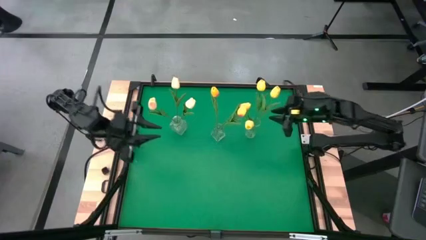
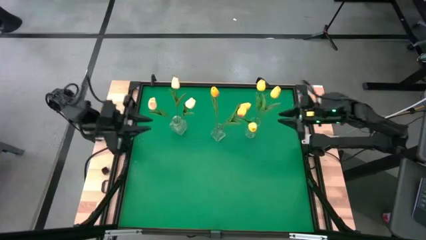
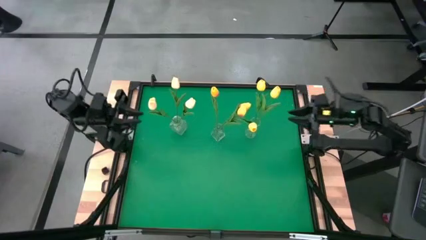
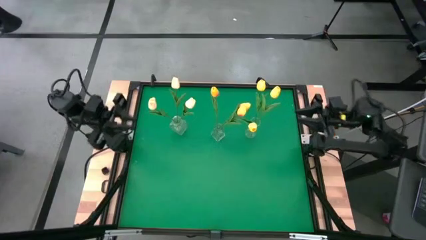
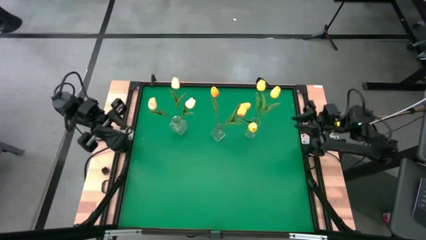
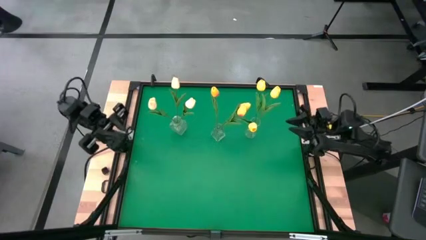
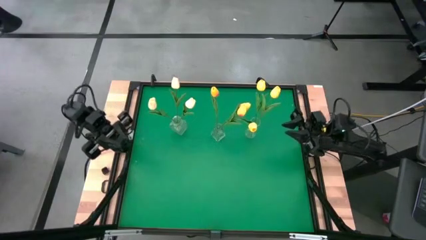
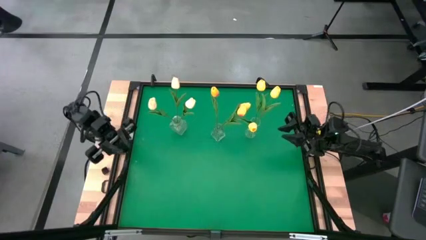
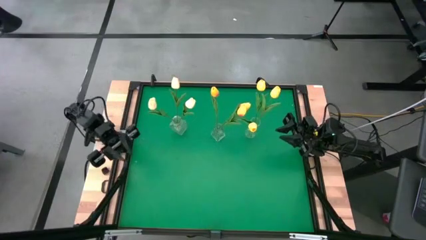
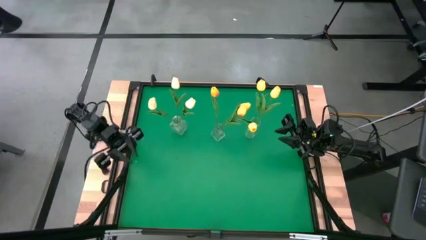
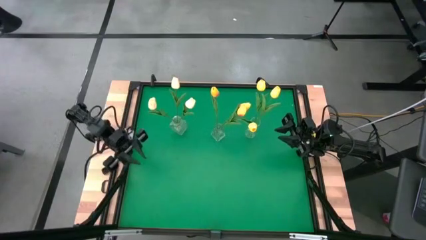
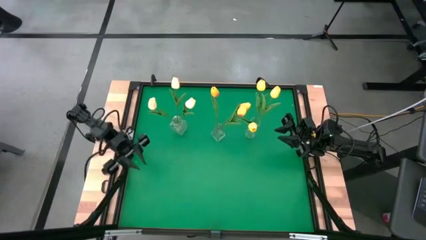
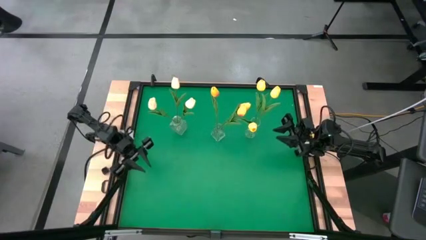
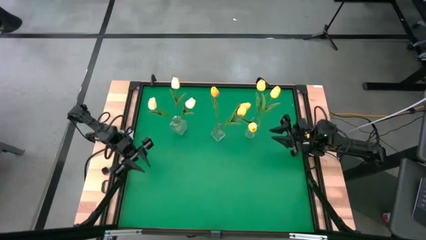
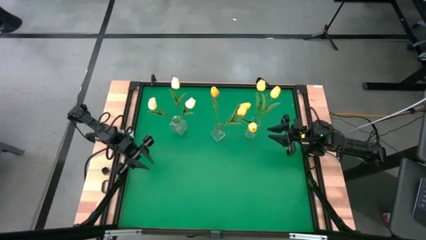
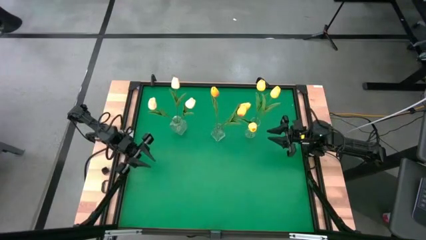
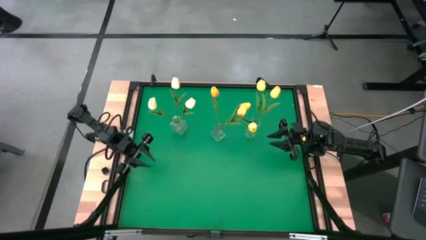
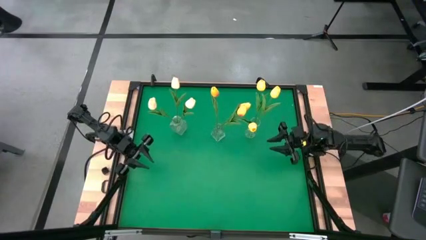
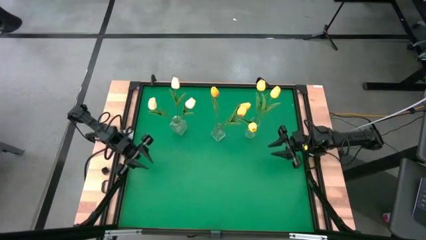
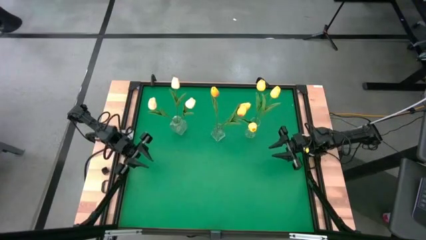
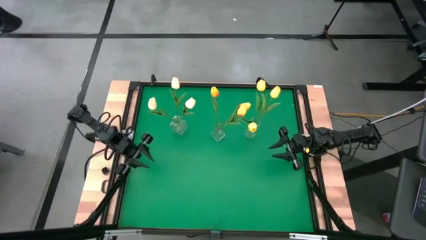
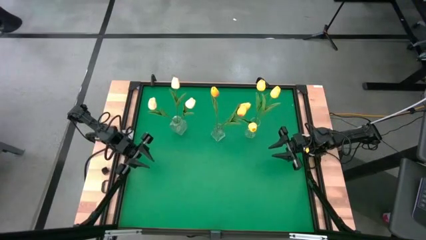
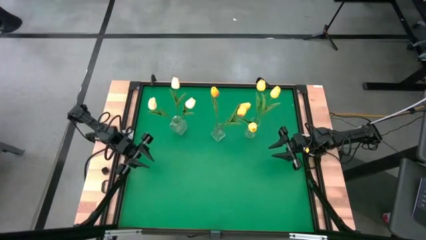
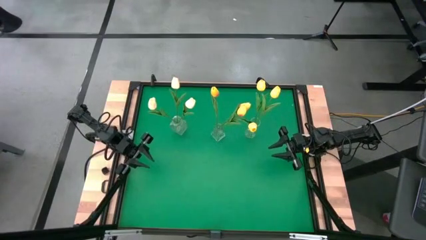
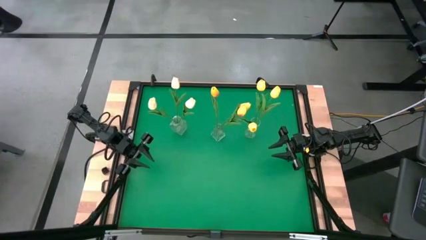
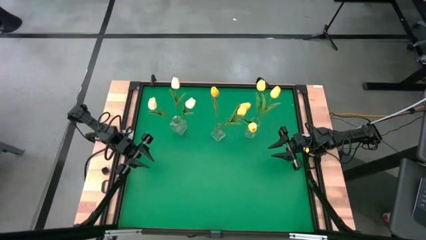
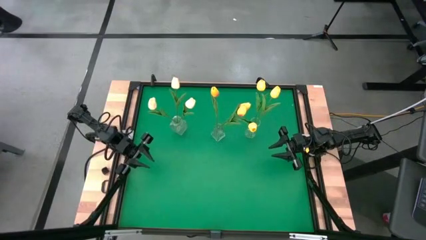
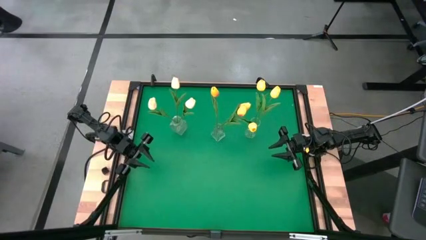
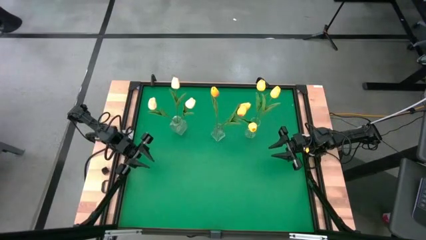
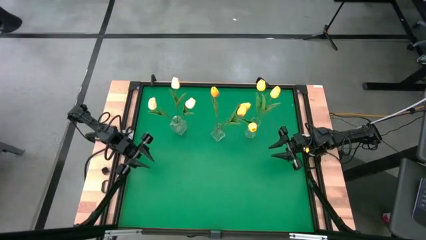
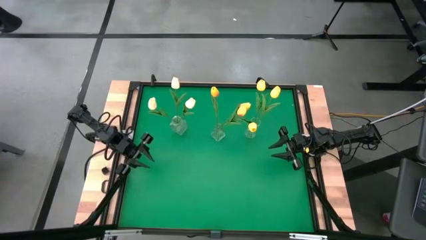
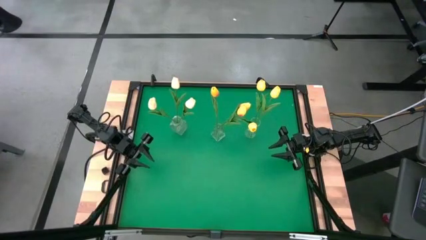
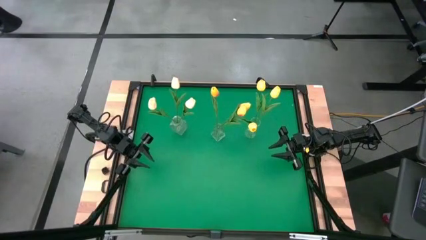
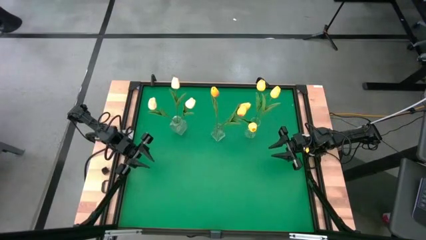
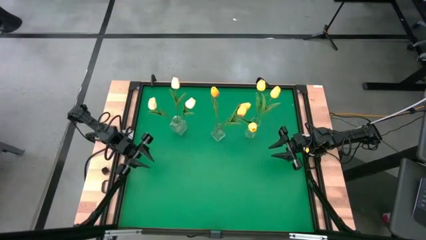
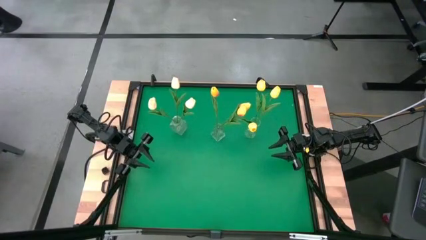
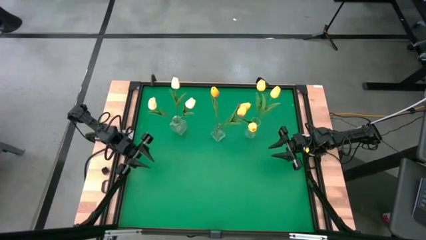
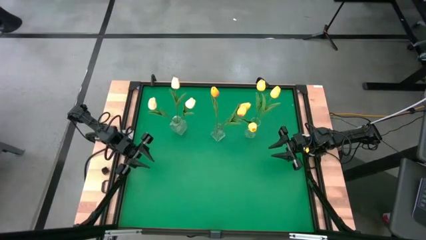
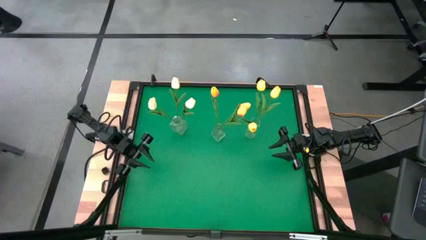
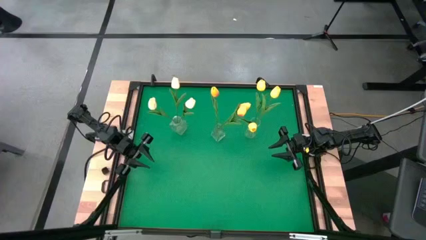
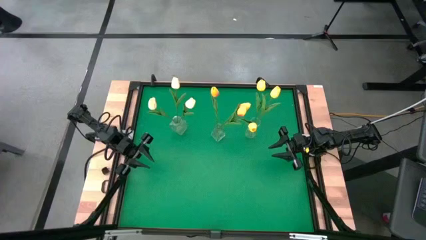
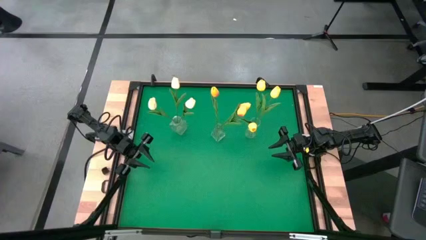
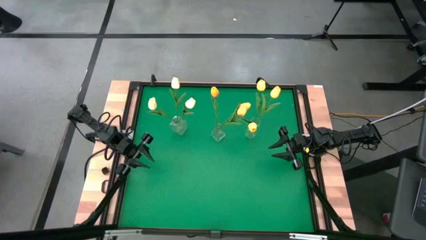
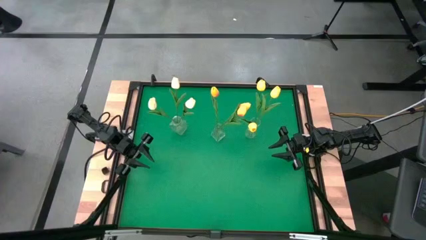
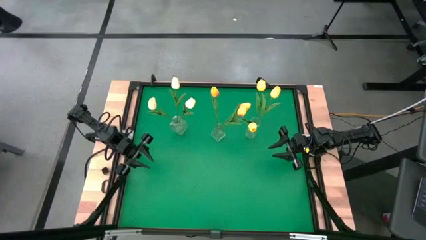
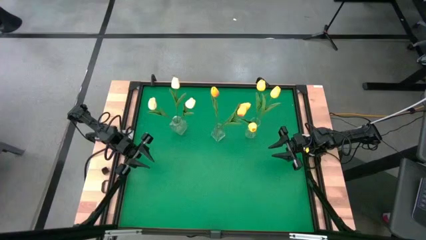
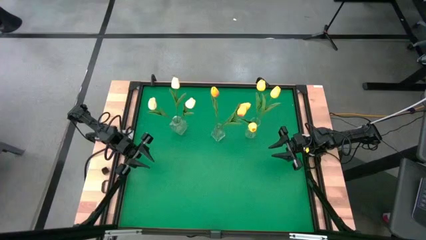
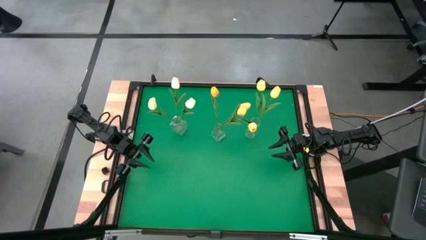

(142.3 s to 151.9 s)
Task: Sort flowers into vase by color
Return to Home Position

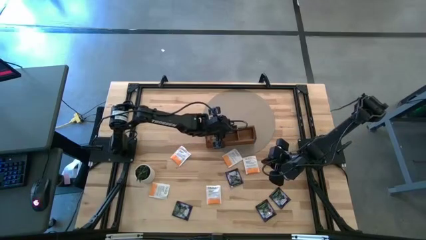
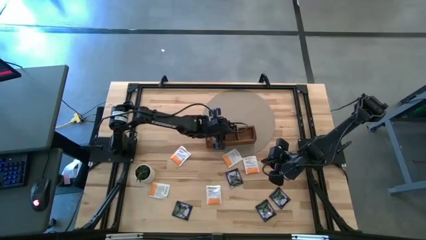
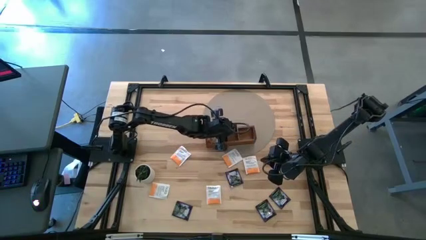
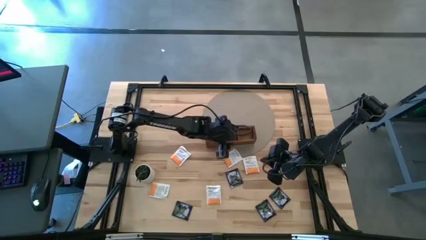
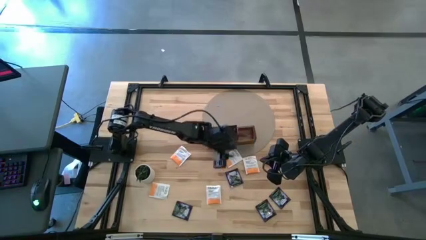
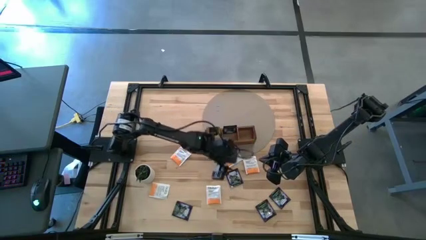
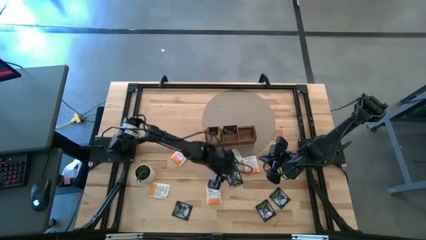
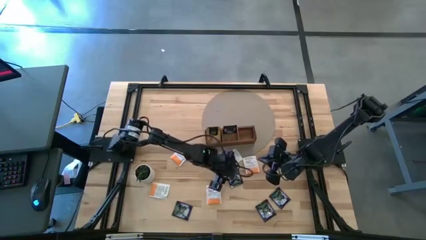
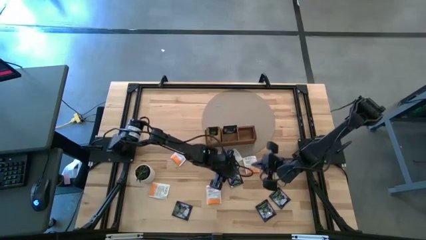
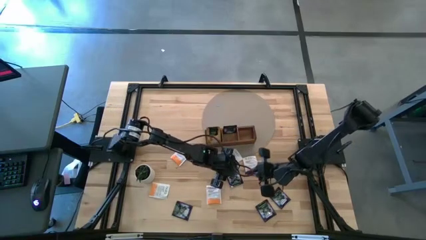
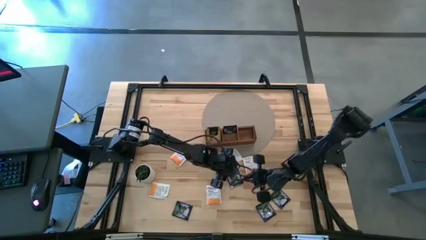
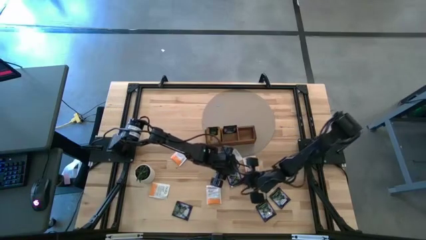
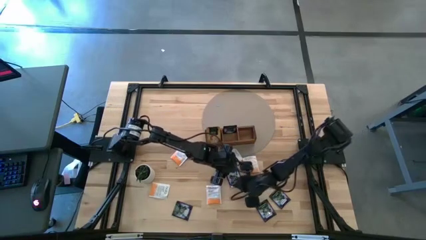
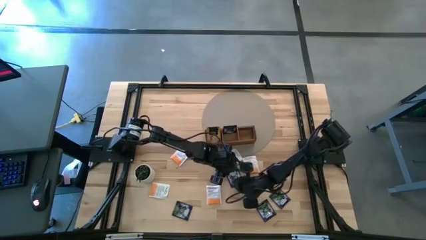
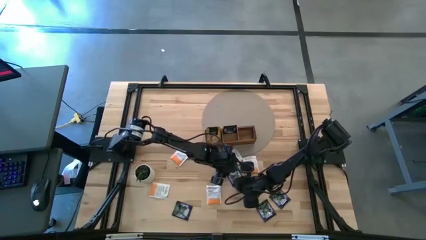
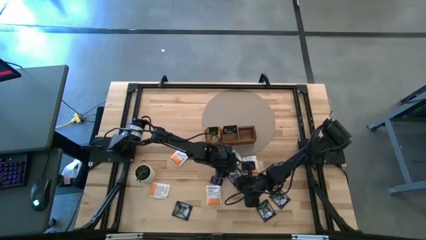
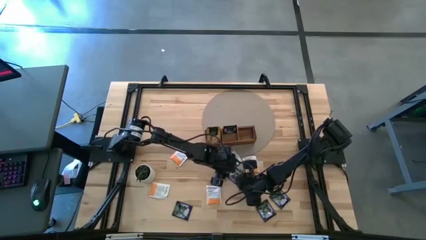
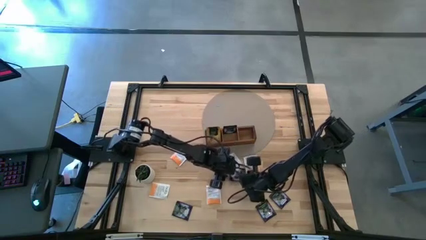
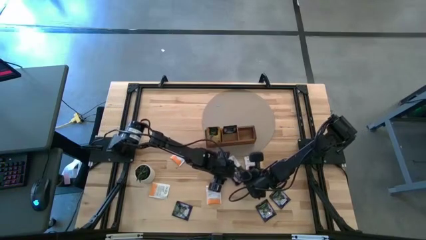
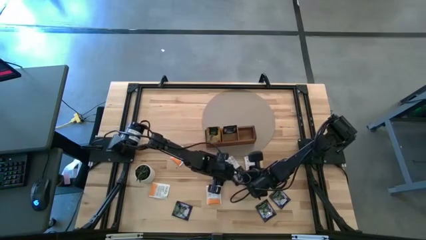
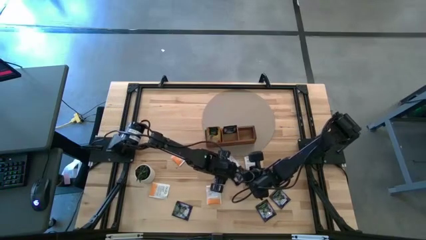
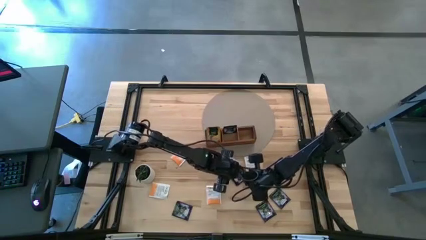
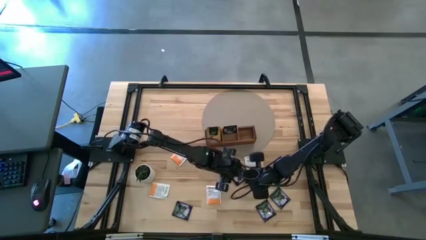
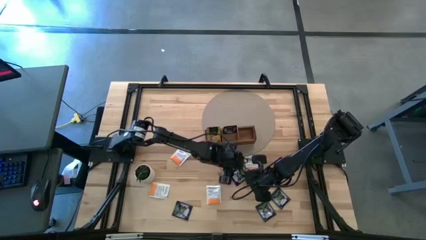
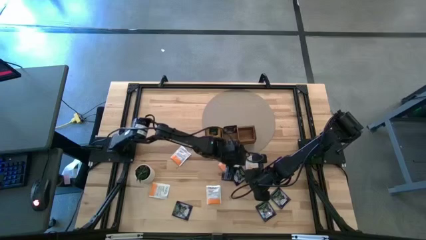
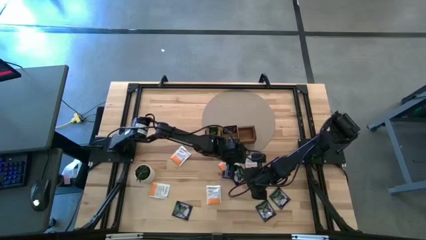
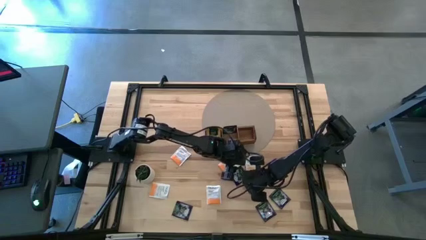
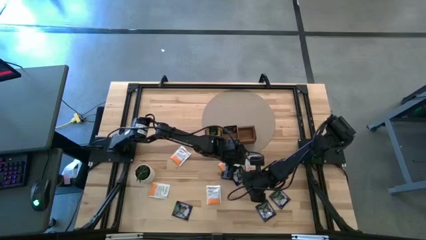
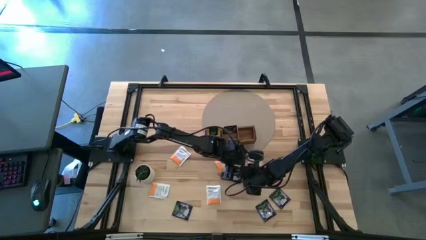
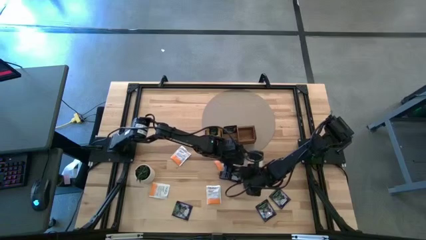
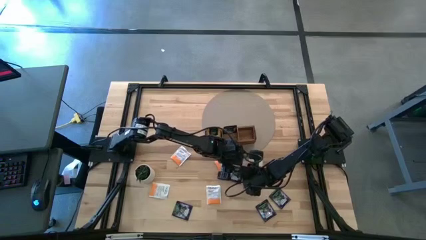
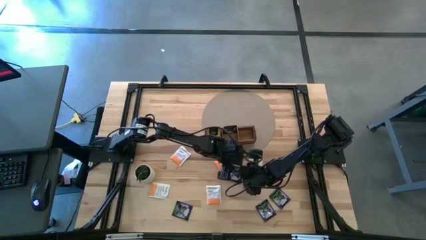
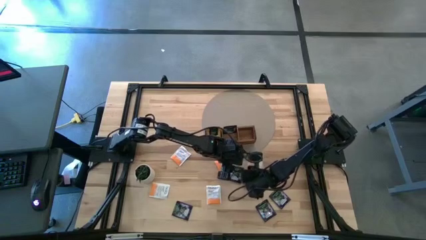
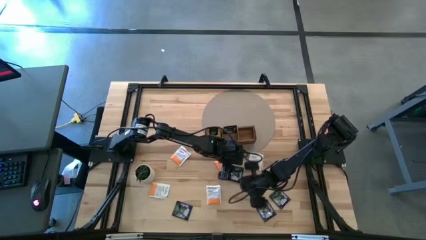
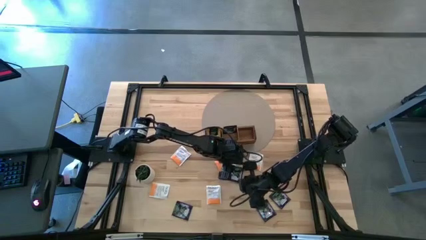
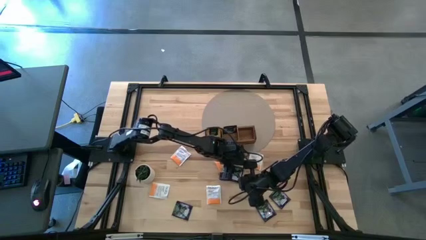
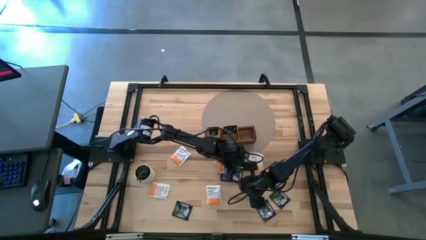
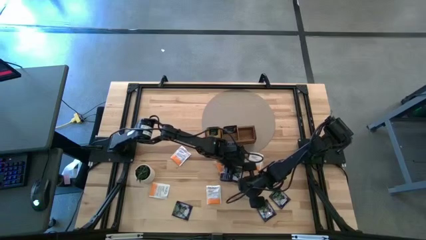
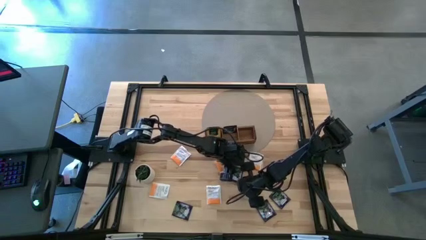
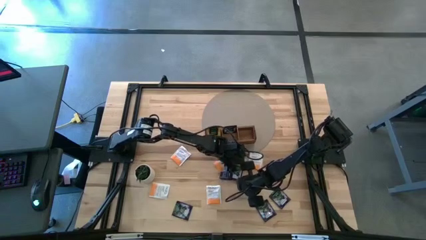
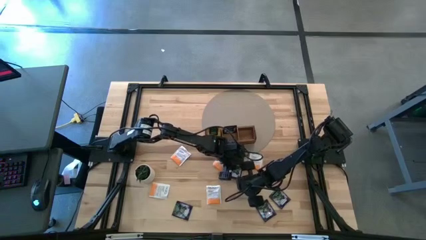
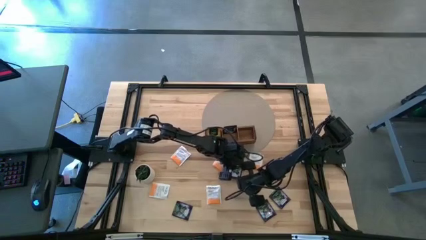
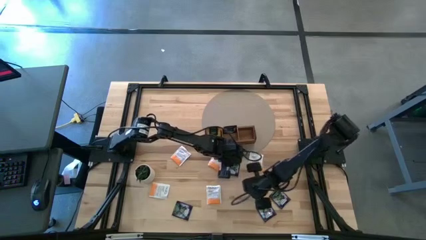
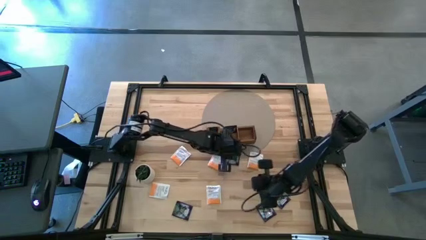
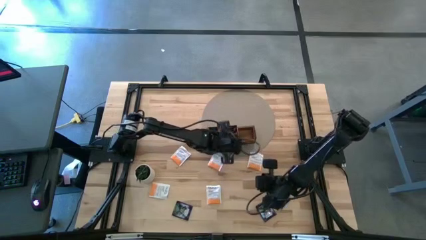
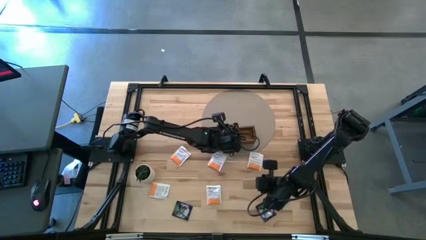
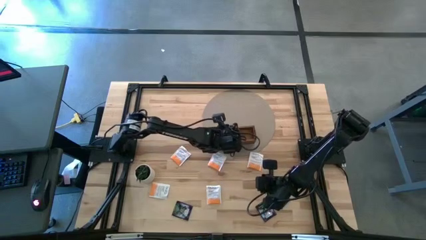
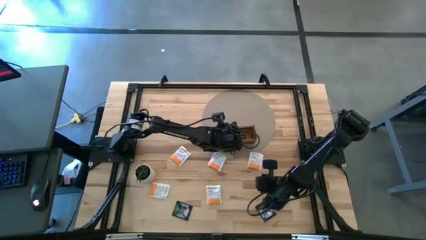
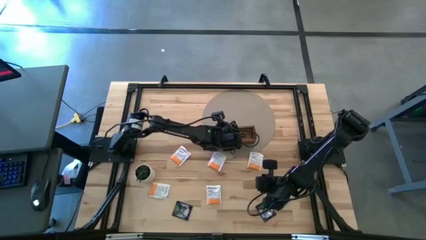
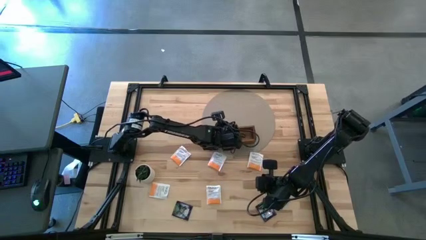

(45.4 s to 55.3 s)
Task: Pick & Place Tea
Put the violet tea bag into the middle section of the wooden organizer
